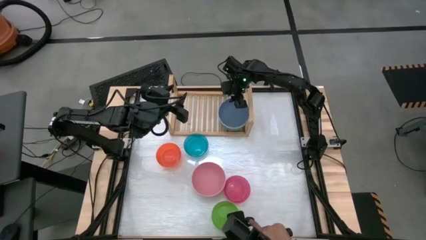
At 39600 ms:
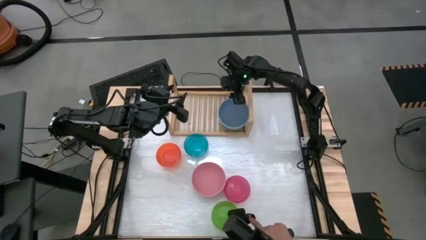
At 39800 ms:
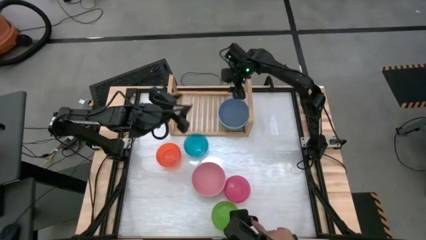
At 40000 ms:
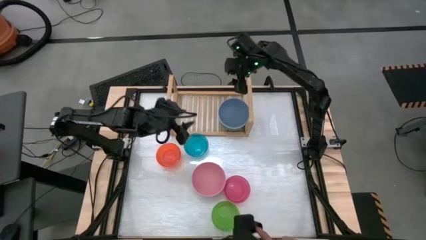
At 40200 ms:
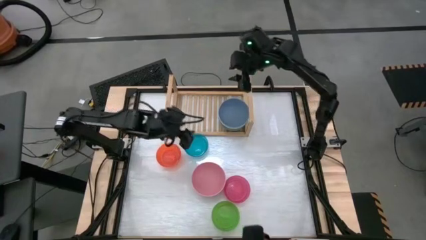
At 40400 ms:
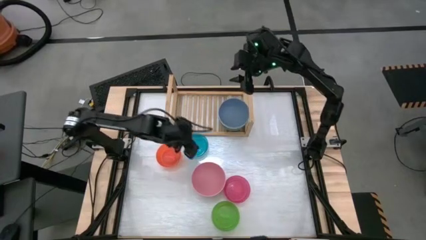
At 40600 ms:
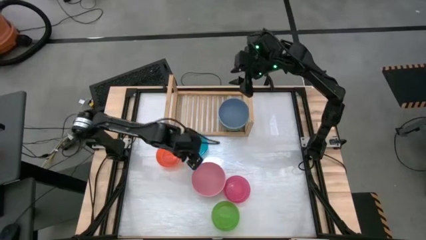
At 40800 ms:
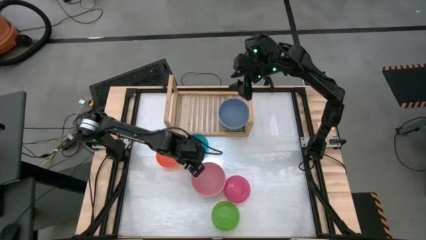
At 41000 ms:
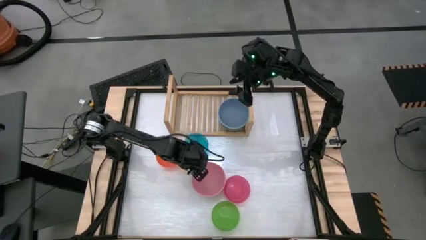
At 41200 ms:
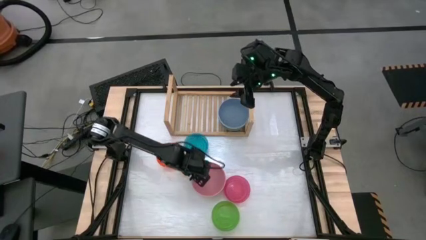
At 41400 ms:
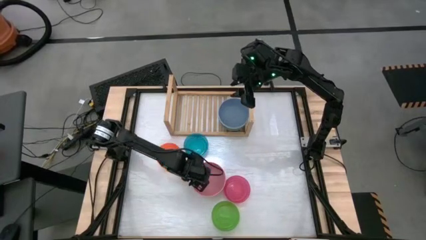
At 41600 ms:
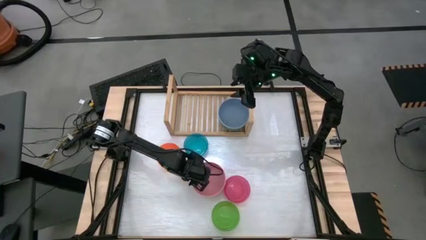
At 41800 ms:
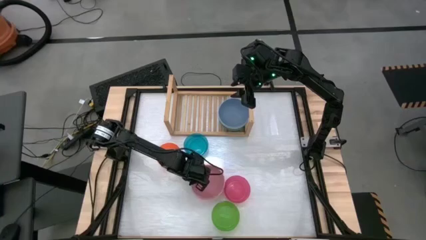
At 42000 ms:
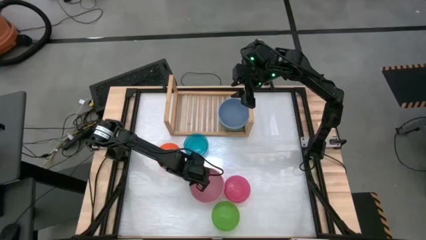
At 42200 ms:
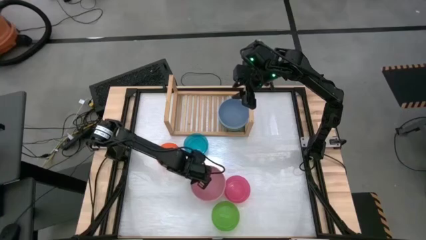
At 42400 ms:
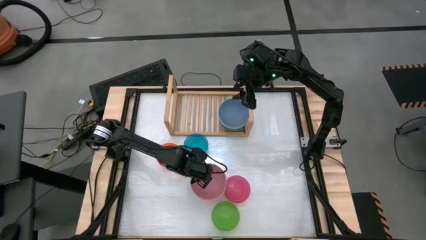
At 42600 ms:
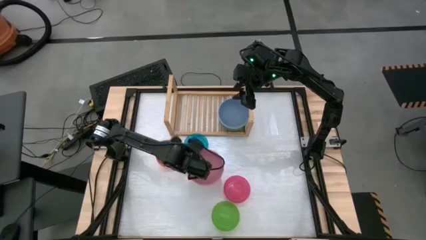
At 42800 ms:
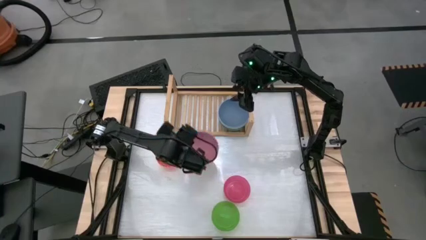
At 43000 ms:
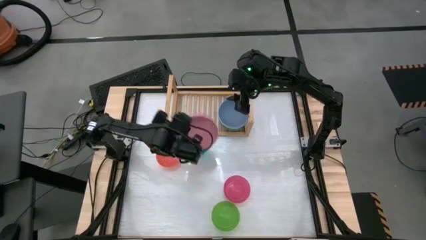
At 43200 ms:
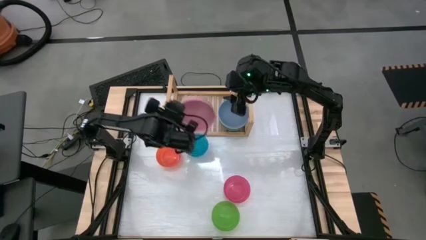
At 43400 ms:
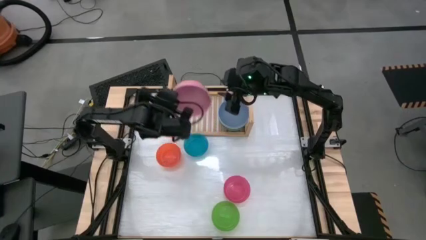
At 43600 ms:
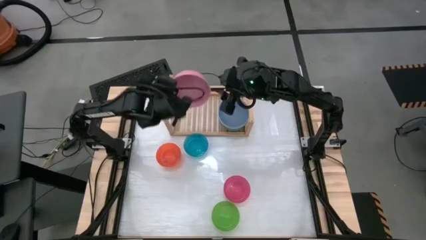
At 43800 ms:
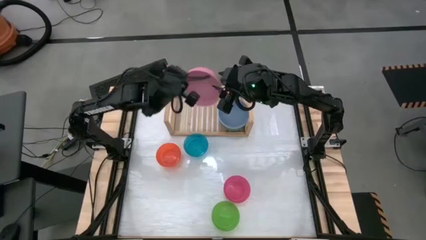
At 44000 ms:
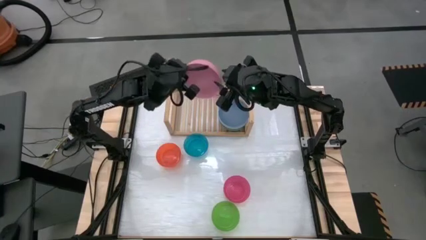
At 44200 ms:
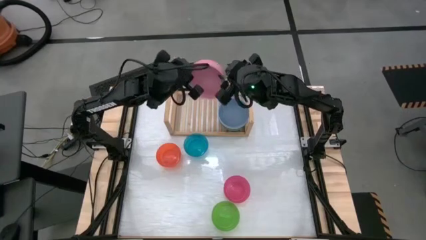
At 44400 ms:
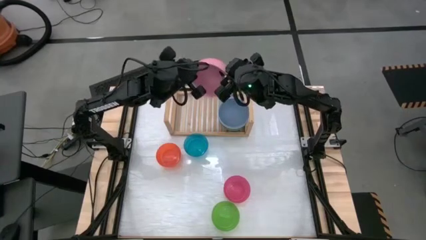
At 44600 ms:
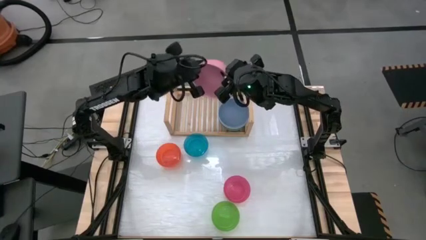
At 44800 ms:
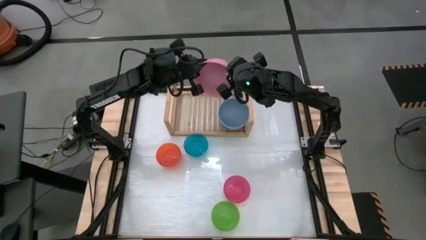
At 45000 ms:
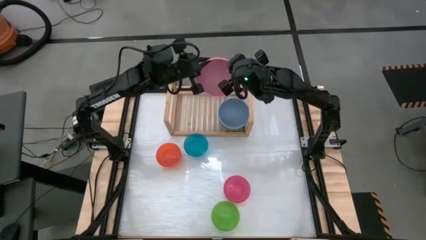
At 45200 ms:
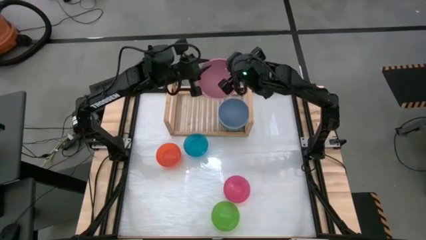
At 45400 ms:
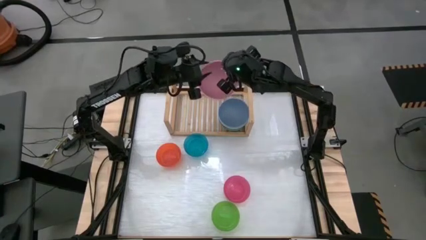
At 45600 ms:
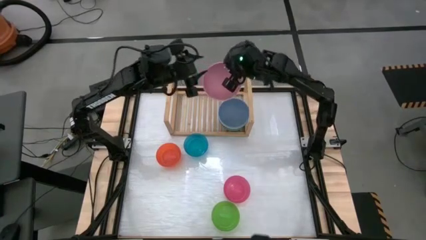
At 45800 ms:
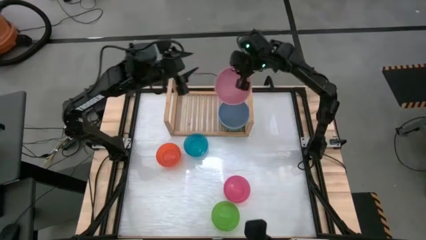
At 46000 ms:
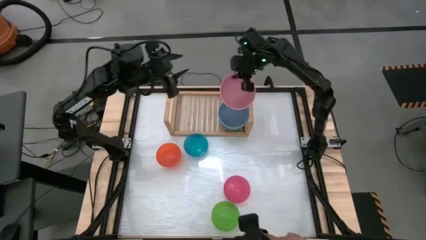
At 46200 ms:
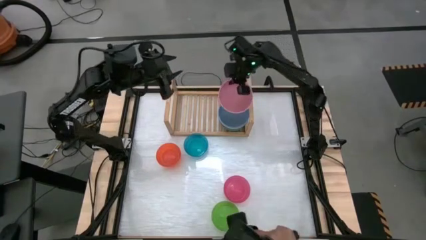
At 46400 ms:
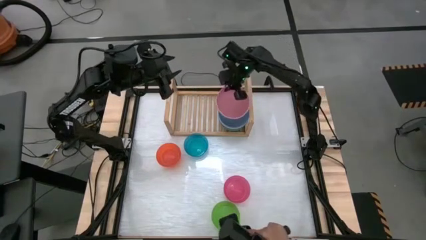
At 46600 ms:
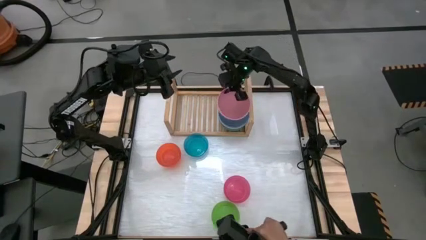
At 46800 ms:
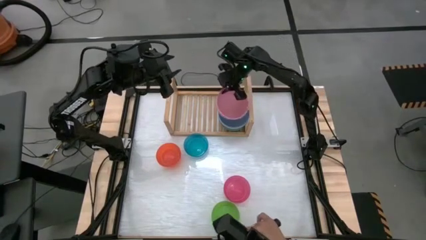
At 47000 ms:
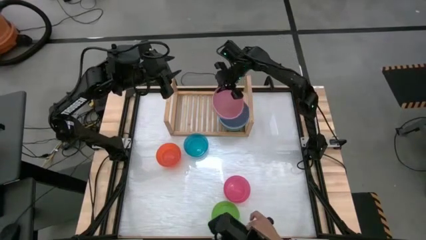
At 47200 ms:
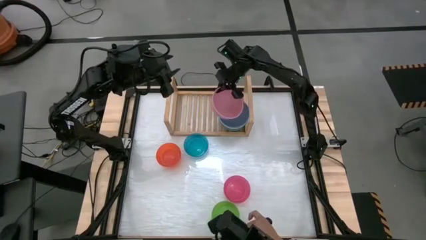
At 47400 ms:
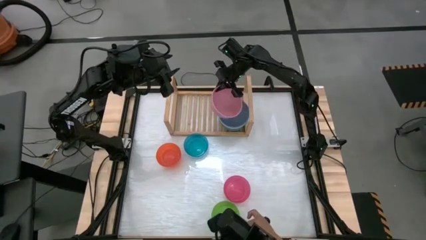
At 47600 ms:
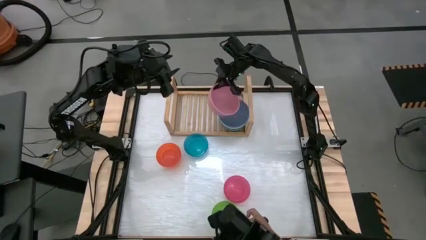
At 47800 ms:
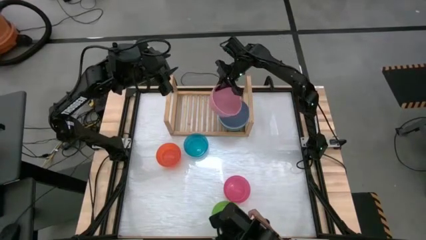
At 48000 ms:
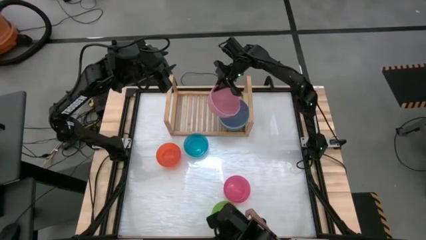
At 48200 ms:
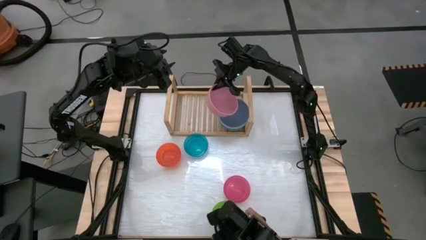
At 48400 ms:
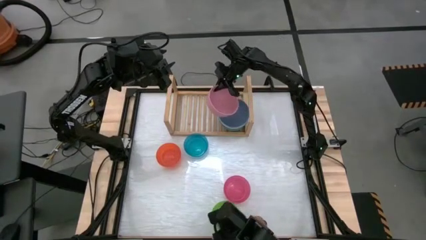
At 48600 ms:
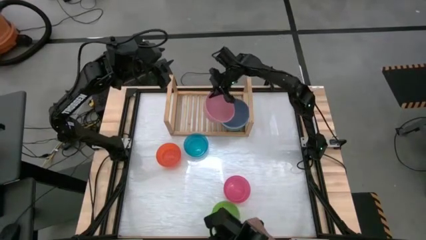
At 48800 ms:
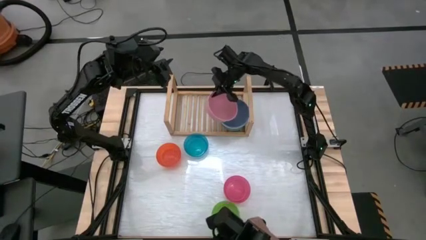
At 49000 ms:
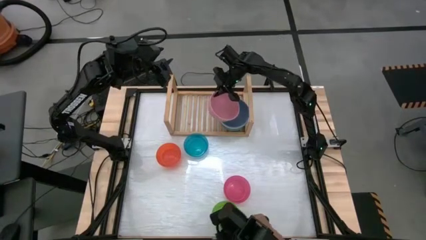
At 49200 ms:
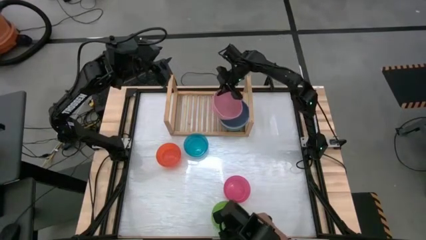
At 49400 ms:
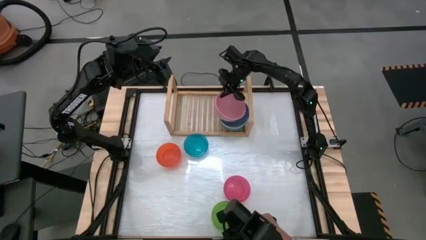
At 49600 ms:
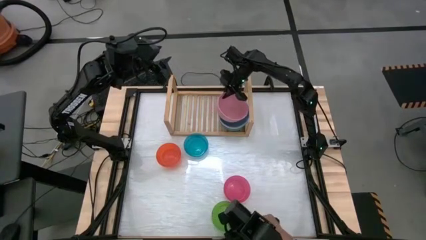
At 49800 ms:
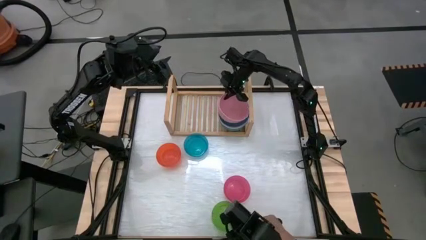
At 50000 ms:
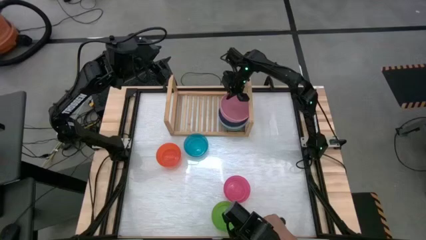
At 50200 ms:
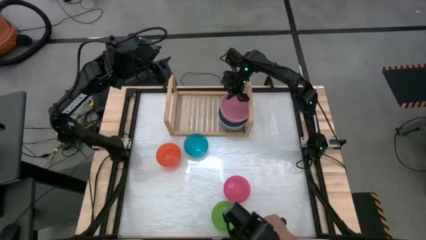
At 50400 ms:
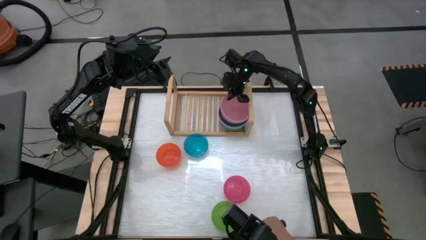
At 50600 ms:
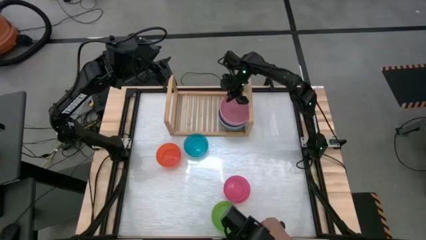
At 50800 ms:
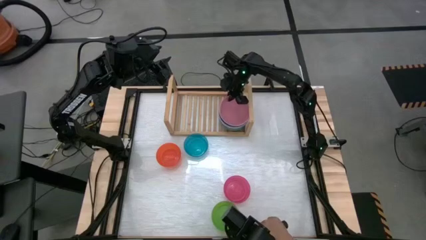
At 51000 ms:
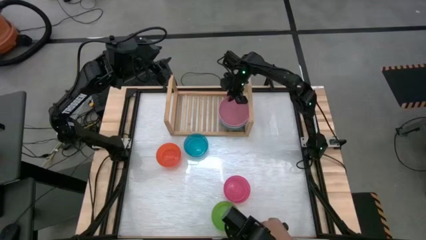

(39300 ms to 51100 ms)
Task: Place and stack bowls onto a shelf
Stack the pink bowl on top of the blue bowl on the shelf

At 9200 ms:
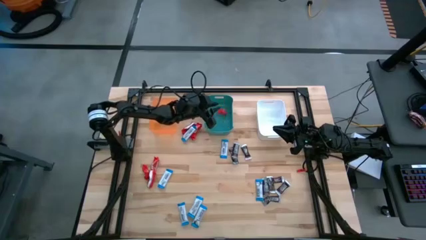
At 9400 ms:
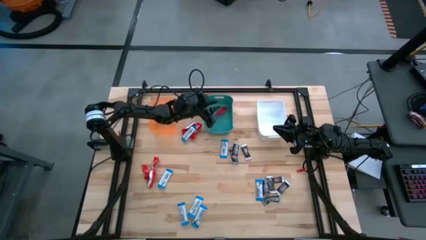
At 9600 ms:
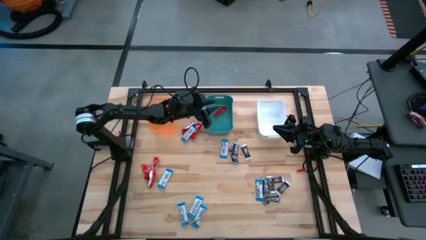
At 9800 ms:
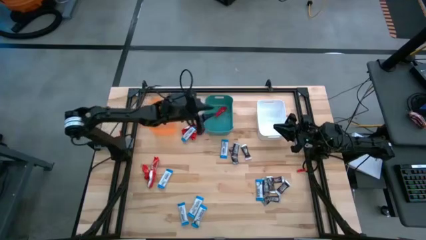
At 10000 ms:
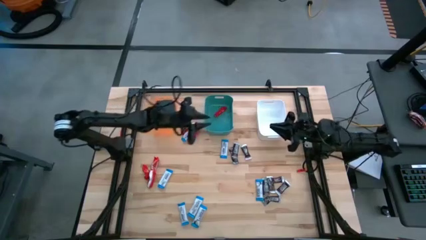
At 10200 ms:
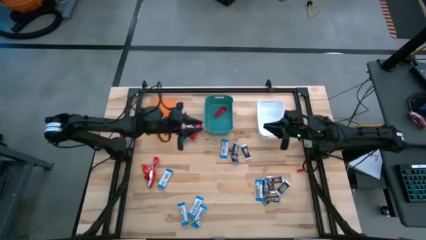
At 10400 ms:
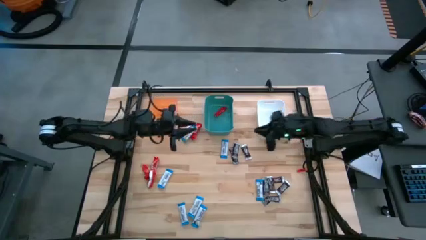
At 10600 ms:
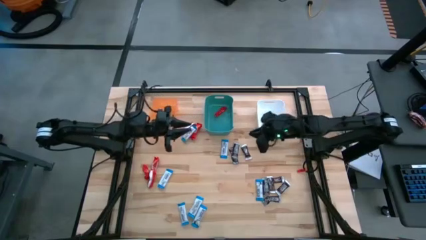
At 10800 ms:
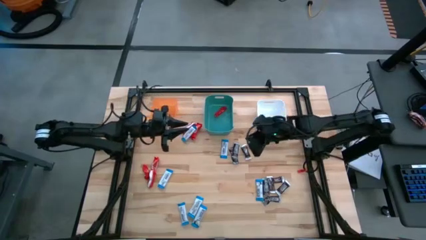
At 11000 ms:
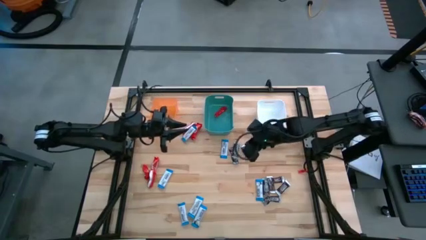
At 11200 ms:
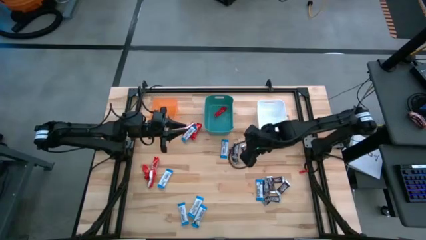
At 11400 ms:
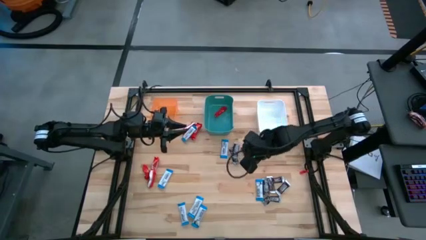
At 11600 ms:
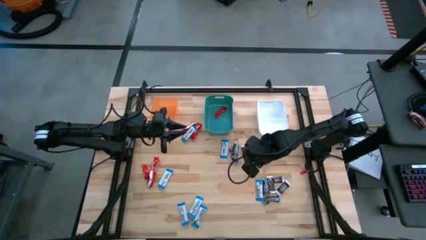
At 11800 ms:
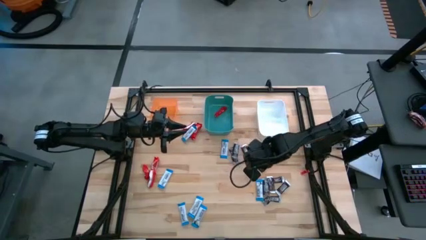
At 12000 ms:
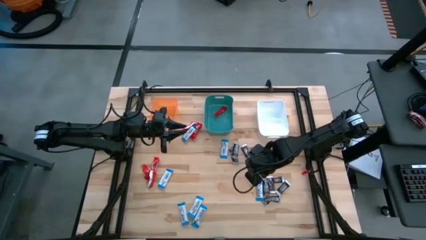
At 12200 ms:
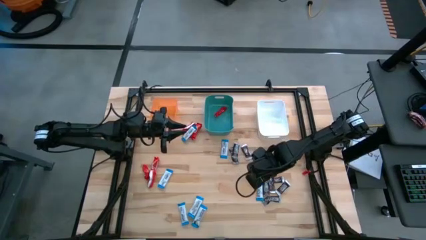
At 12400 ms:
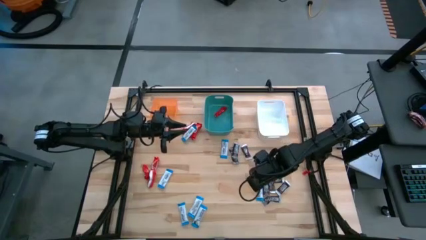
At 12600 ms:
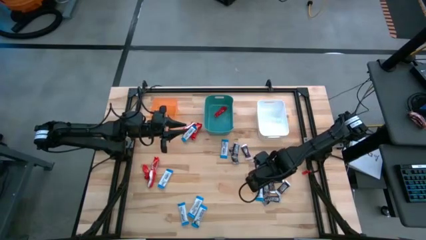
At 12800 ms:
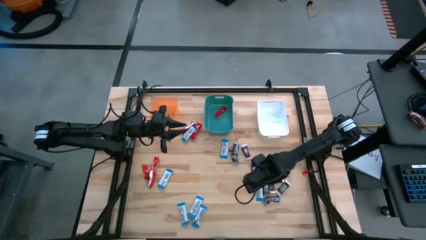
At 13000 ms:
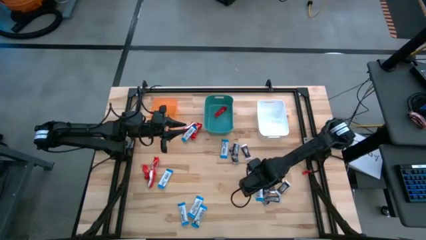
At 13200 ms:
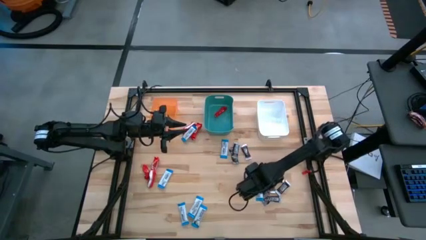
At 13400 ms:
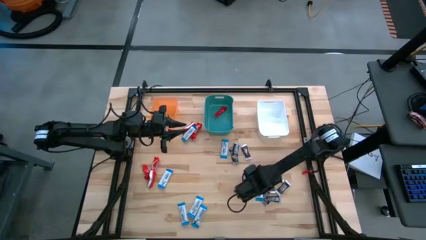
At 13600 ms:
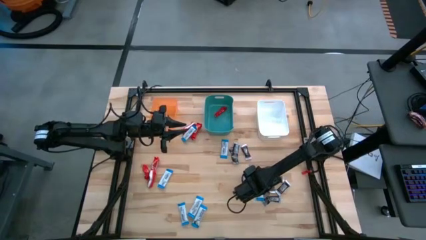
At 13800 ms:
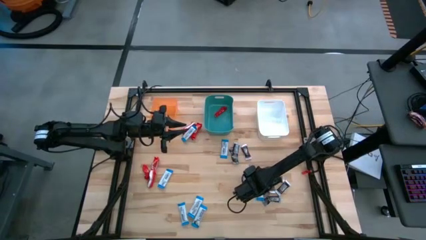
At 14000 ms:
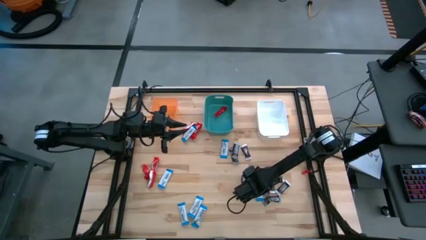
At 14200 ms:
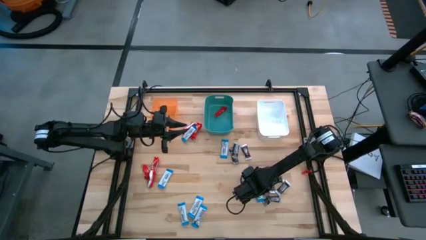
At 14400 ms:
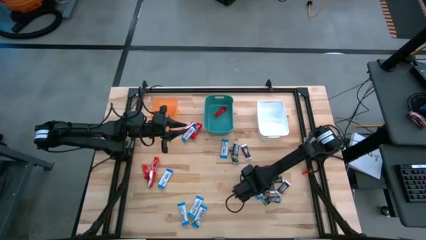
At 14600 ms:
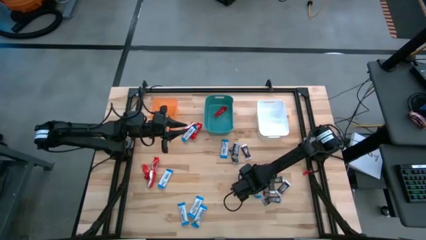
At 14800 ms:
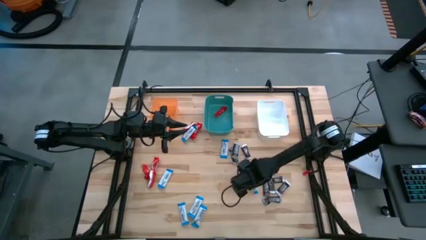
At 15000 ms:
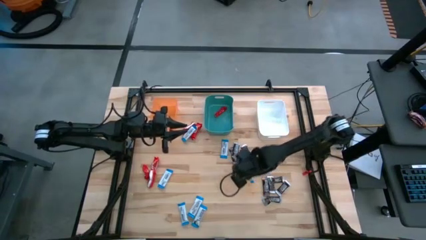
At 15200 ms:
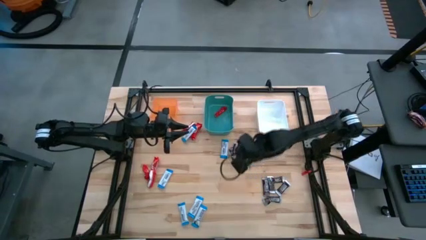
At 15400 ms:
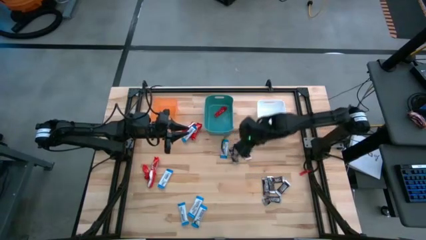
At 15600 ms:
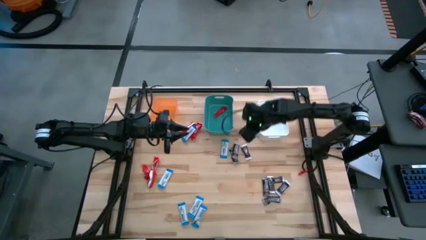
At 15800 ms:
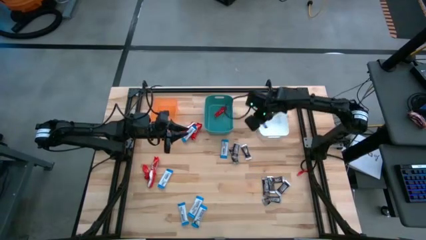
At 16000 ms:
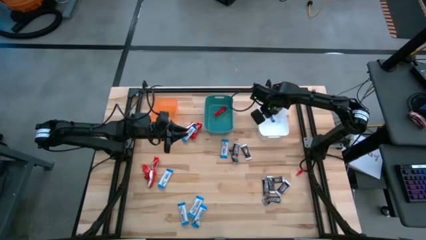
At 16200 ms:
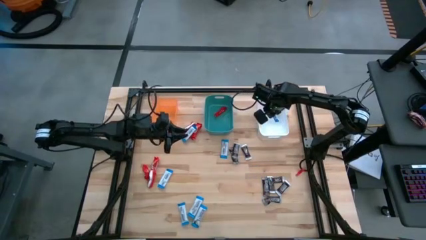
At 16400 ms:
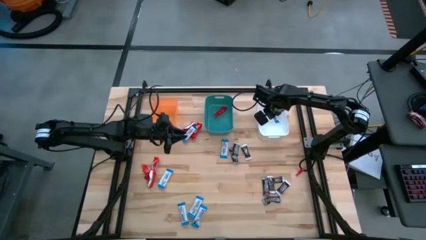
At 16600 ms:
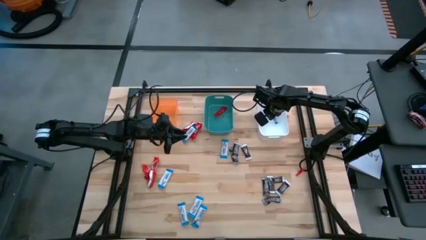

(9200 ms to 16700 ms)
Task: Organize candy in baskets
Put the white chocolate bar into the white bin
